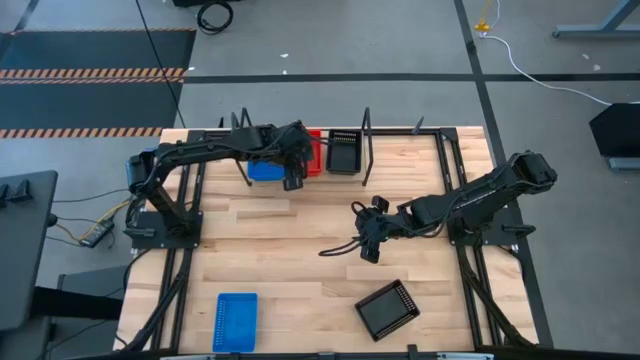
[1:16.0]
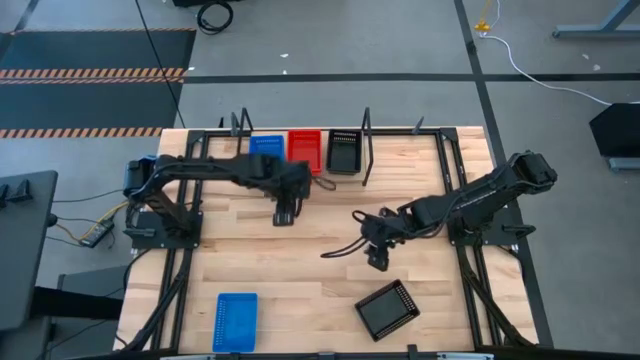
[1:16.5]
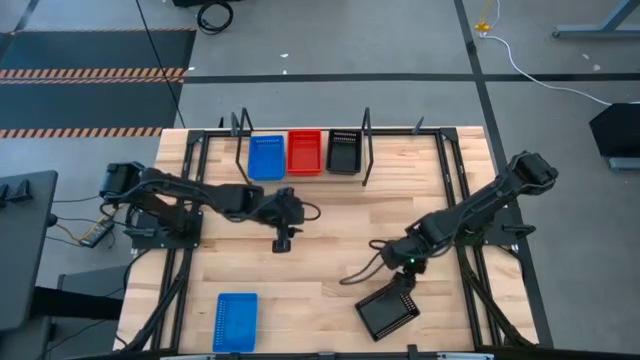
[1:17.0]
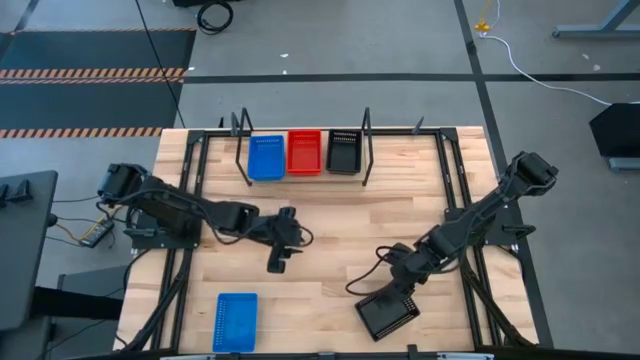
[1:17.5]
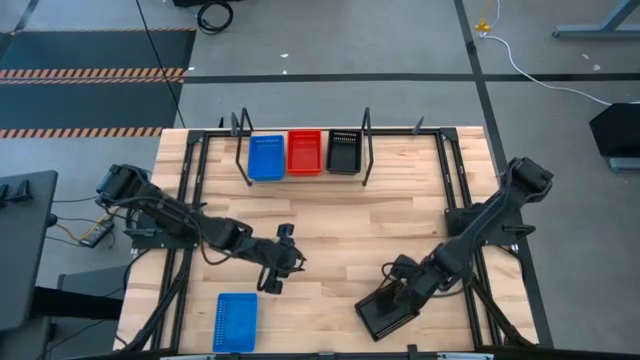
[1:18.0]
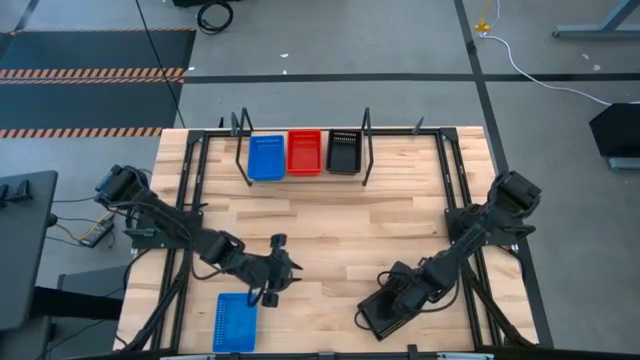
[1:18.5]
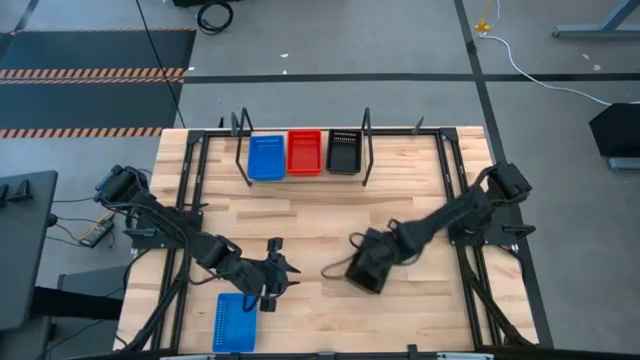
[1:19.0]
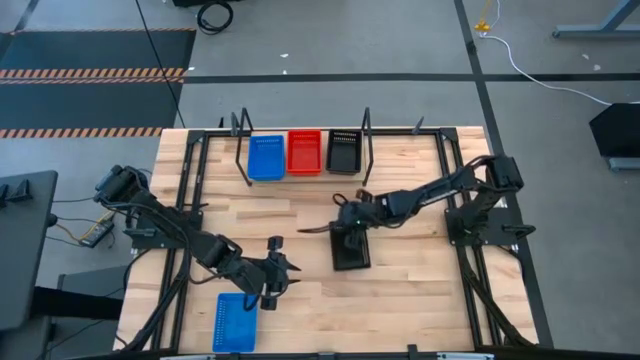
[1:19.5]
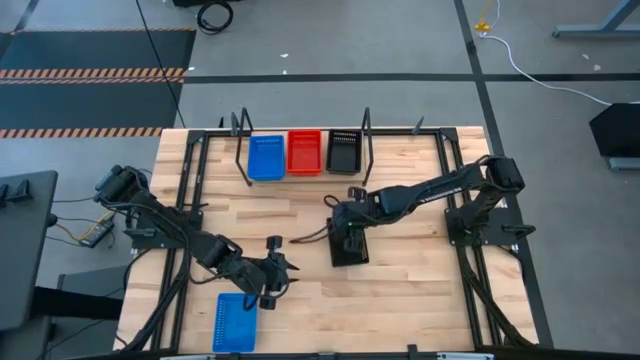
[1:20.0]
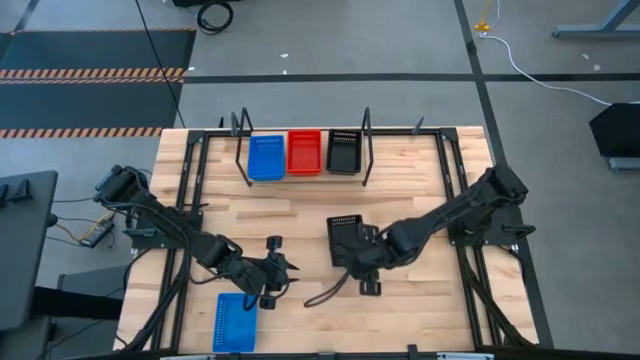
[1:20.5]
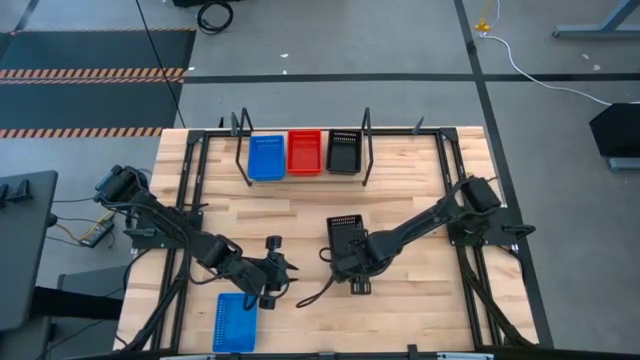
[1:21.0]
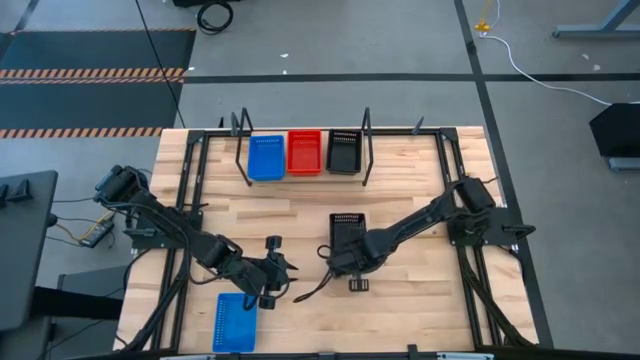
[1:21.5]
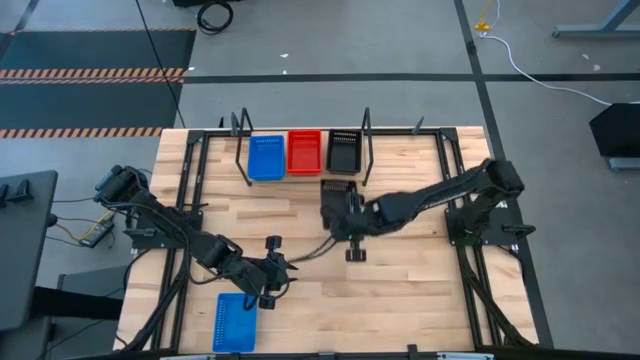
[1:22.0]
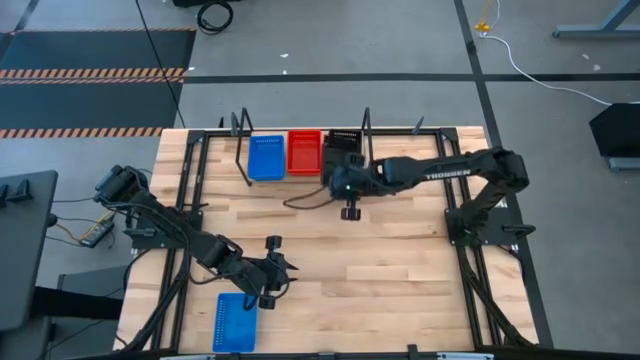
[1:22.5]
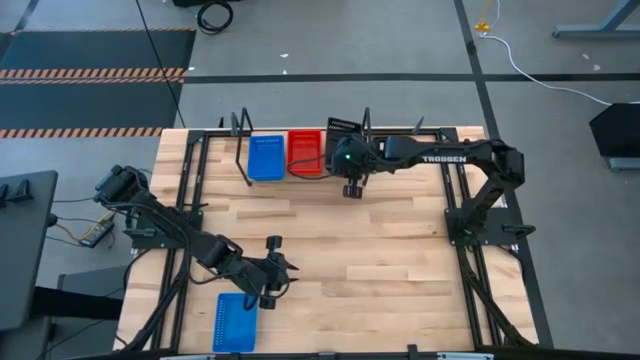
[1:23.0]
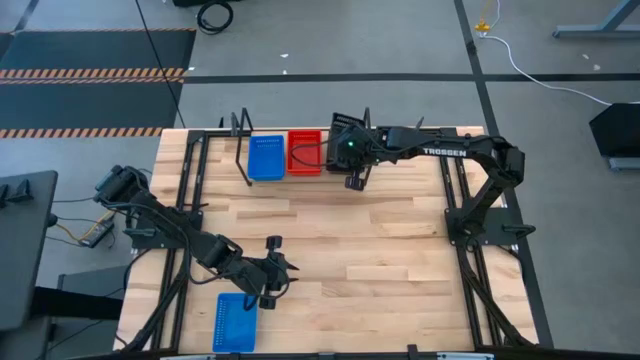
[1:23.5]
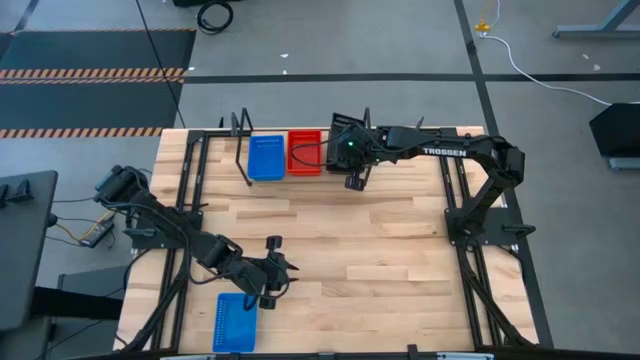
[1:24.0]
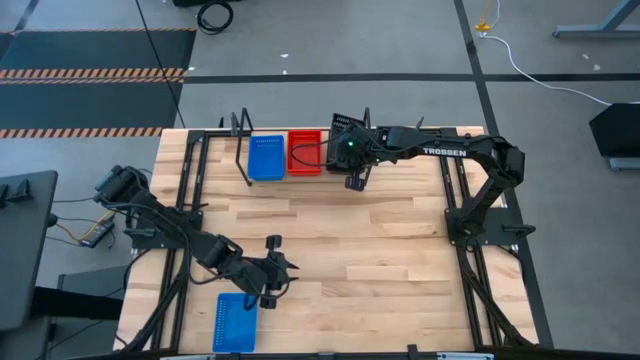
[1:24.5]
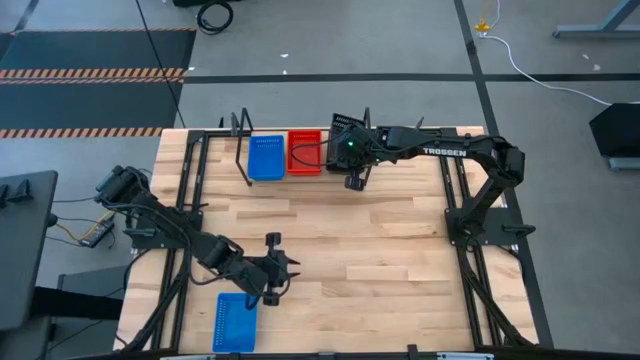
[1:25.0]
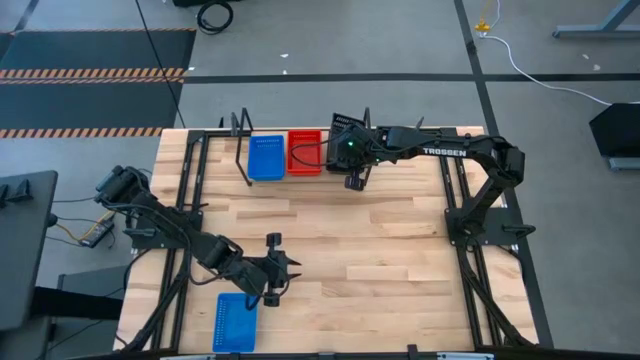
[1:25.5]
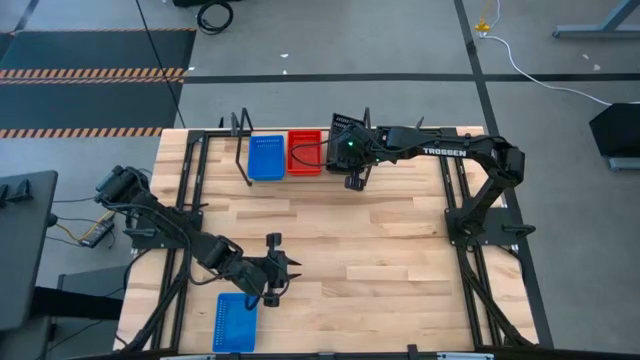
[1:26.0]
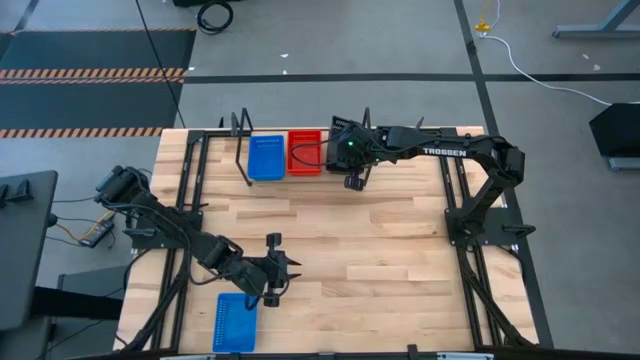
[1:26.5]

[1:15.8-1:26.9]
Task: Stack baskets on shelf by color
Stack the black basket on top of the stacked black basket on the shelf

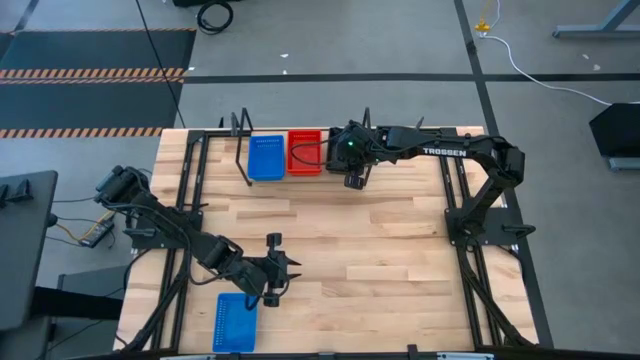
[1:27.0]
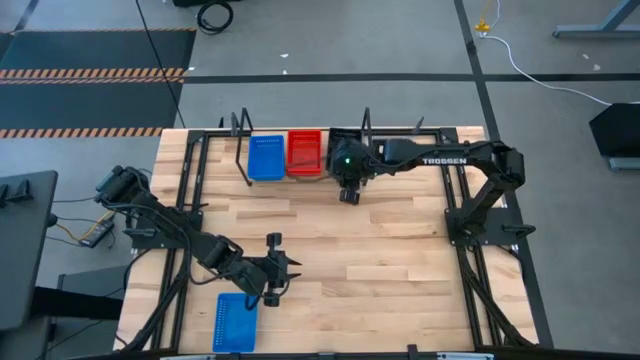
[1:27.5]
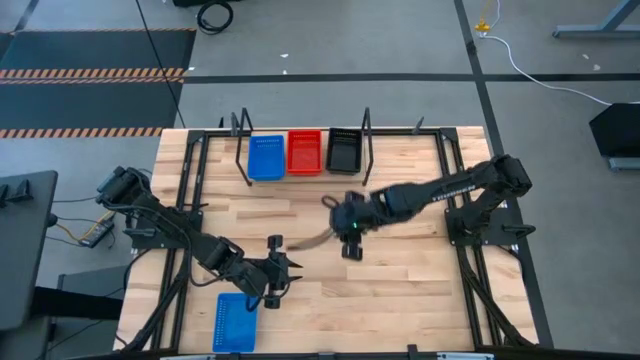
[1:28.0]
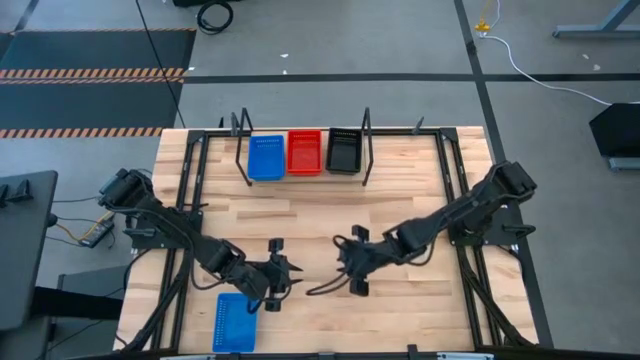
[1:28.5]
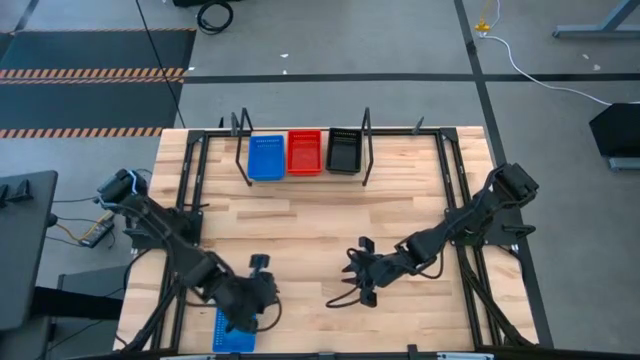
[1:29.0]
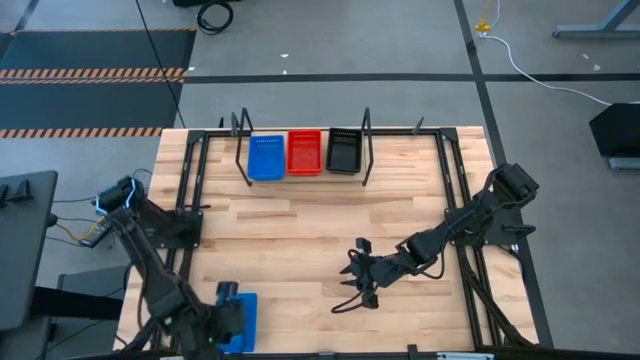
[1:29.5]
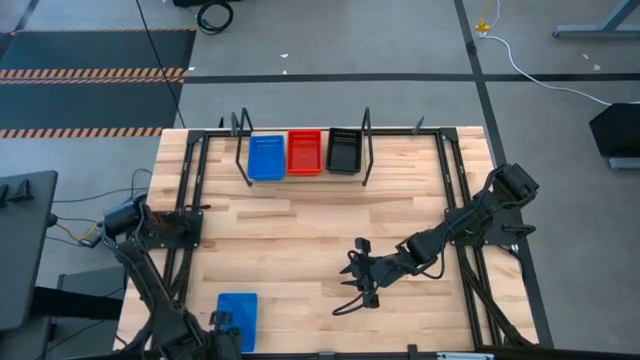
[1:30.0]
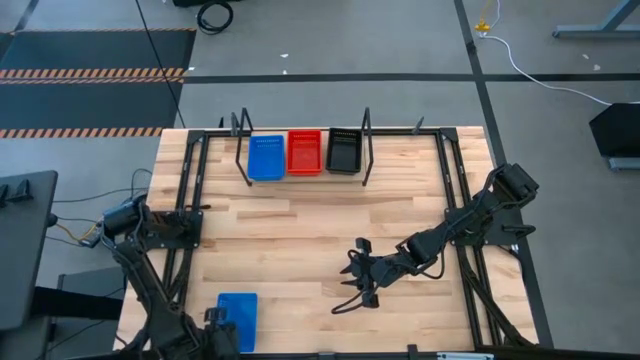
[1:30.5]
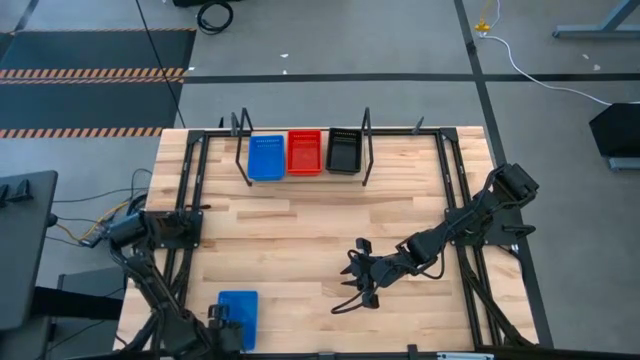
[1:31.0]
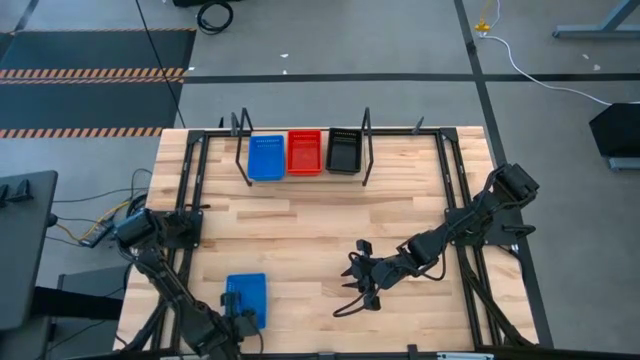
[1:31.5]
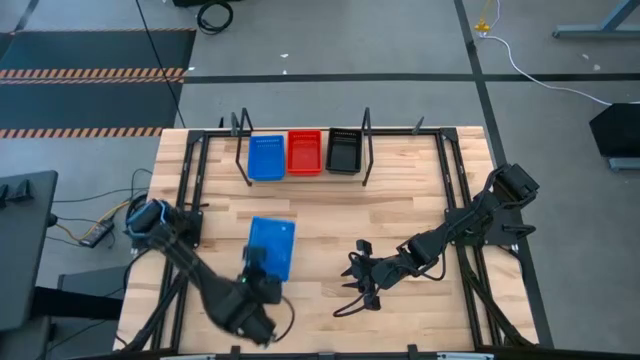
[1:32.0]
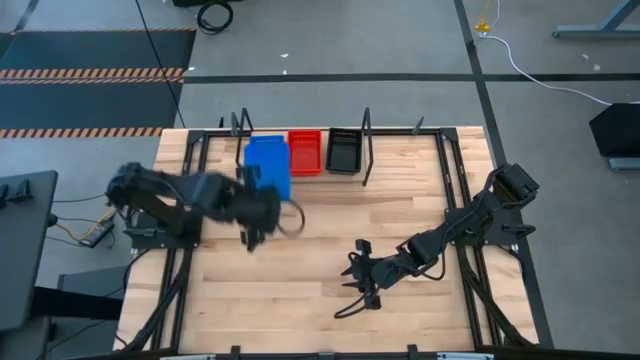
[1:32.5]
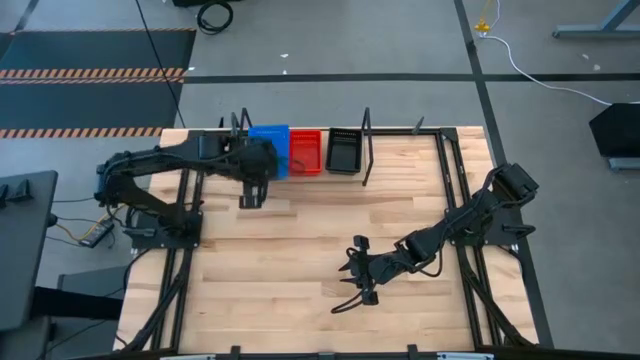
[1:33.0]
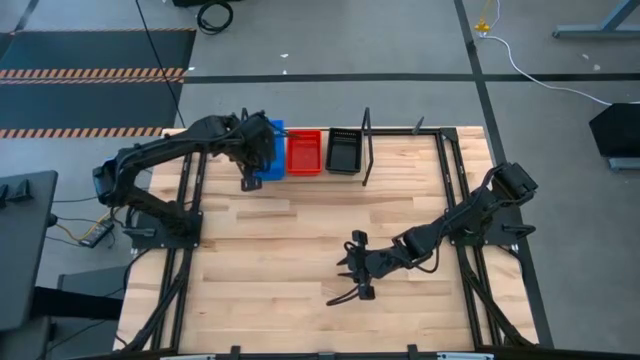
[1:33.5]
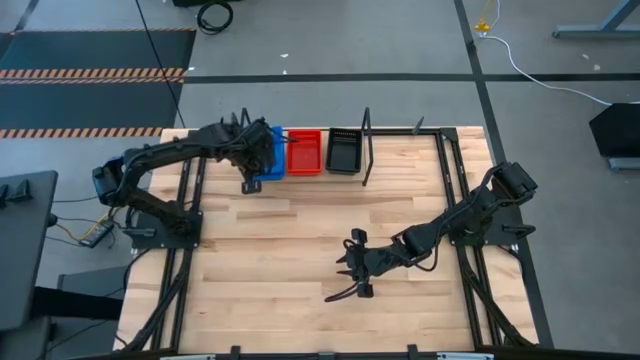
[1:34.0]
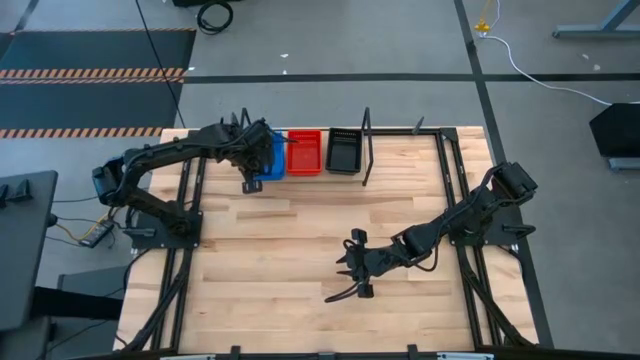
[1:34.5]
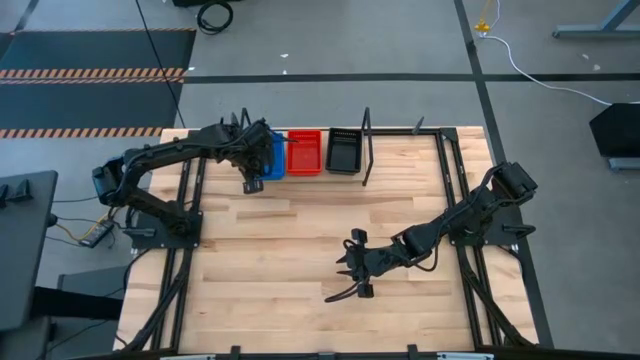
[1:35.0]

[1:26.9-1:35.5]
Stack the blue basket on top of the stacked blue basket on the shelf

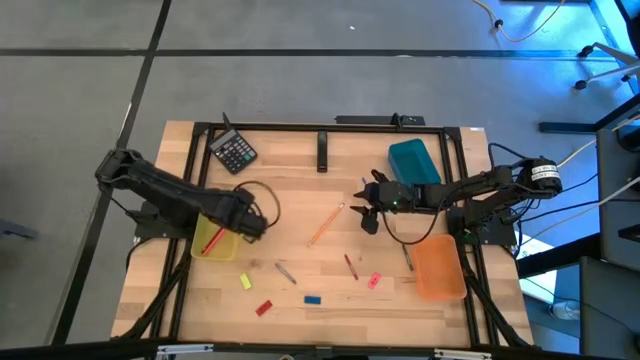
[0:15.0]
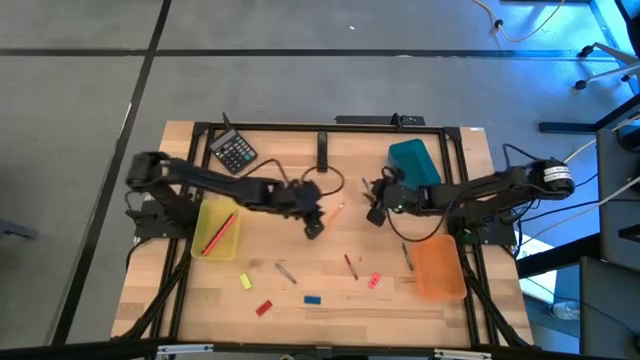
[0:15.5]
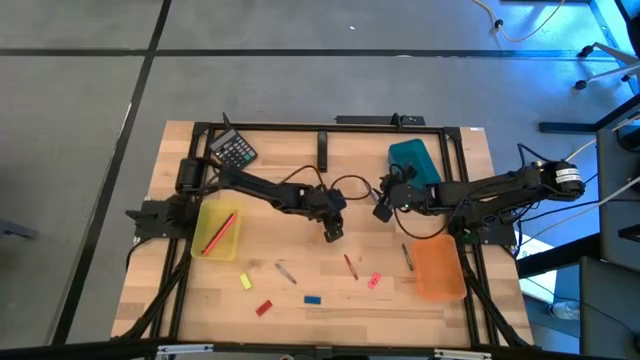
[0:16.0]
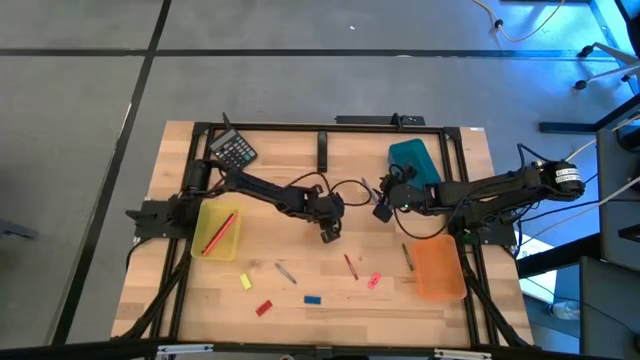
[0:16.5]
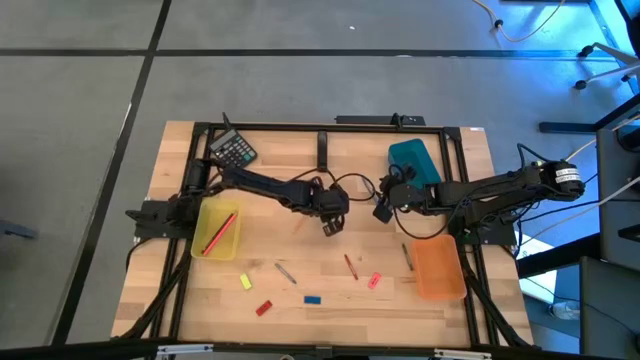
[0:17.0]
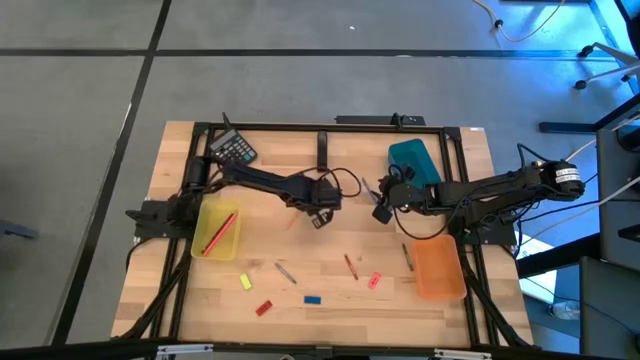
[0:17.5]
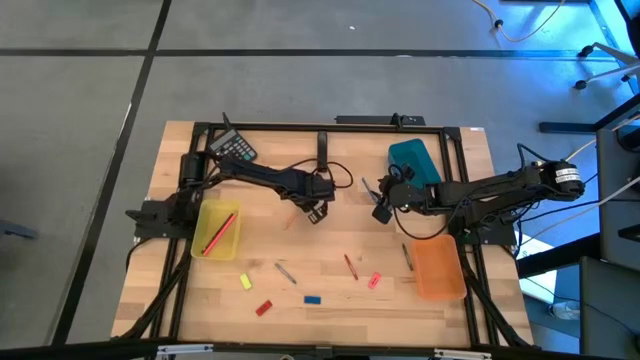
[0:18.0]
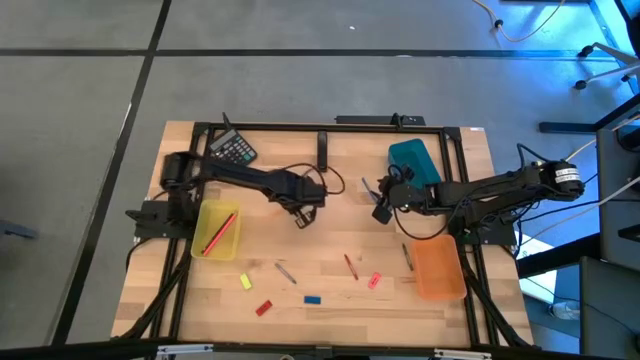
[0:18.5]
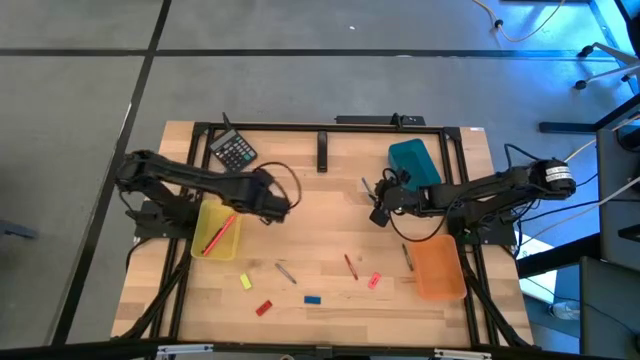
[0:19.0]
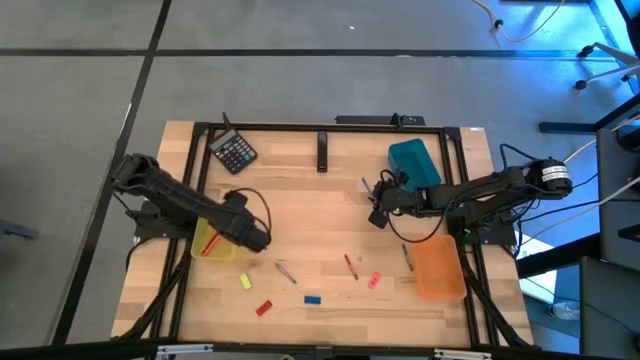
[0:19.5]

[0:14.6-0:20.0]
Task: Sort crayons/erasers/pens/pencils in bins
Put the orange pencil into the yellow bin
